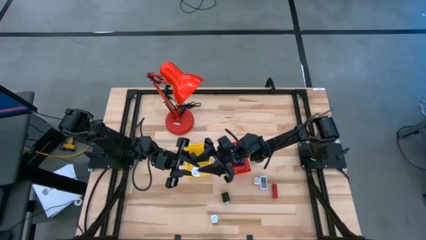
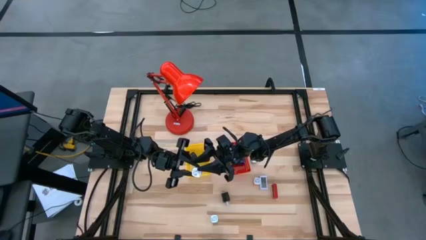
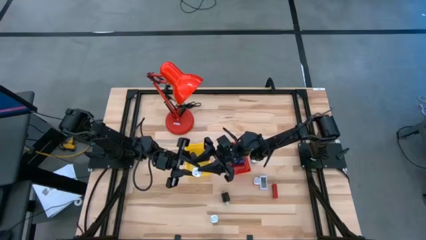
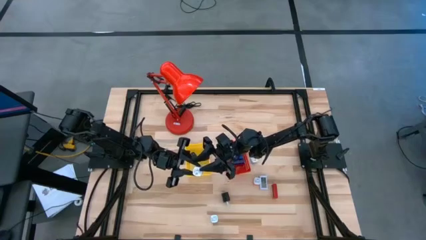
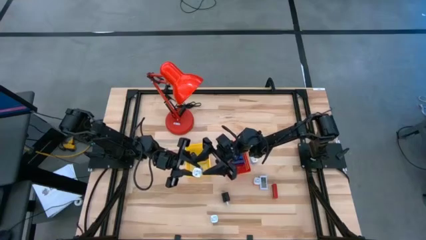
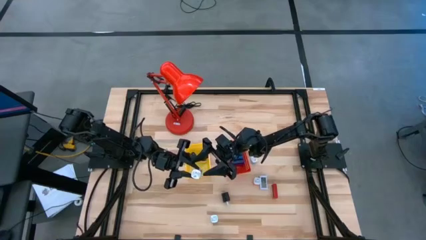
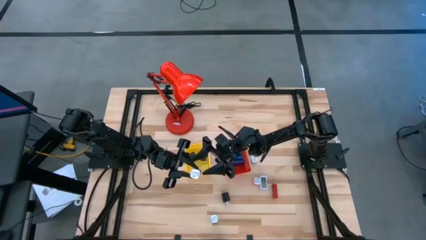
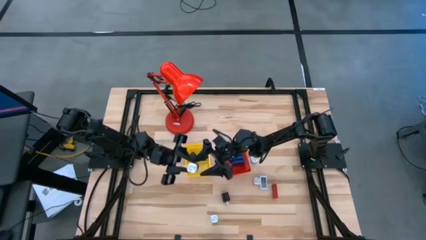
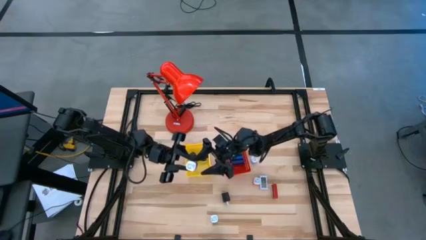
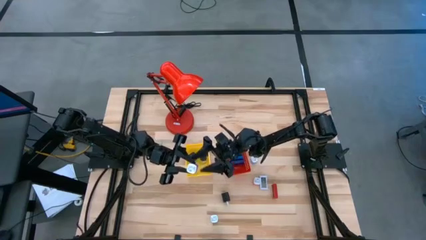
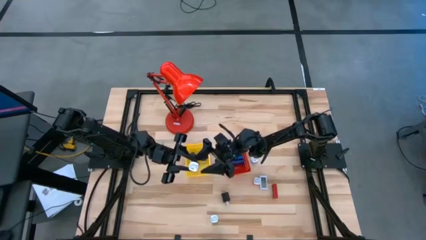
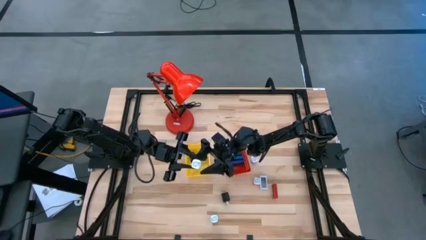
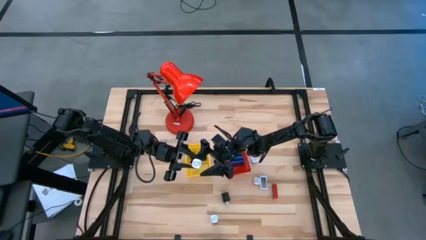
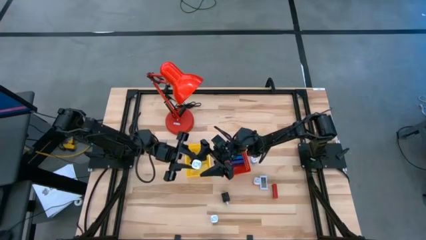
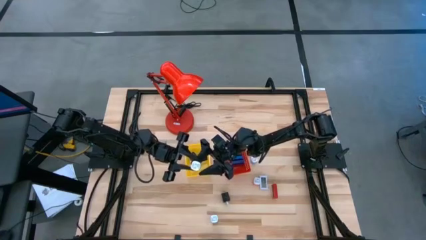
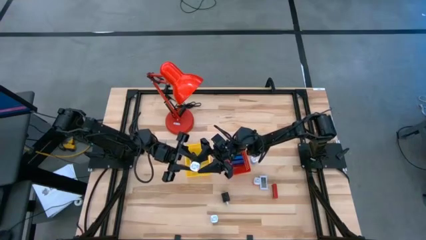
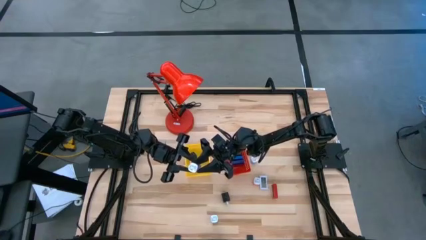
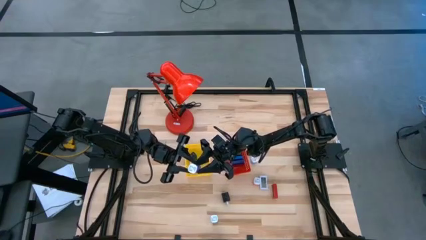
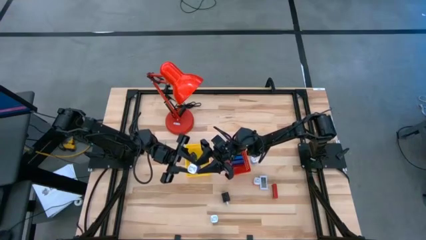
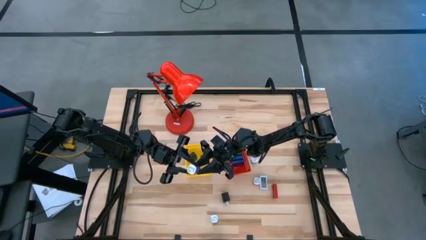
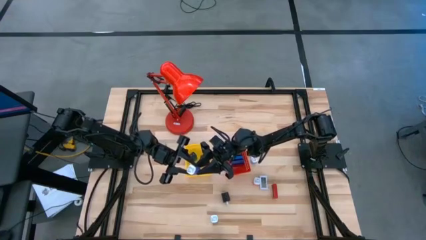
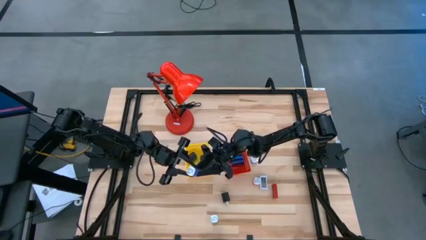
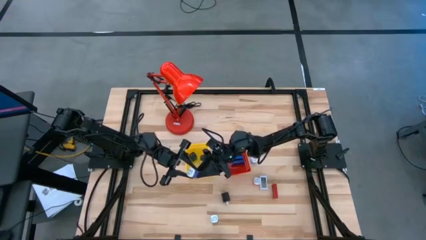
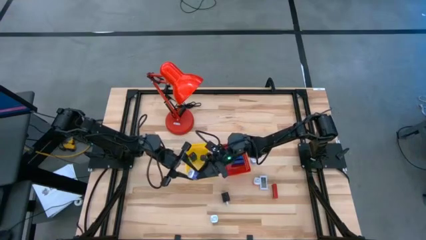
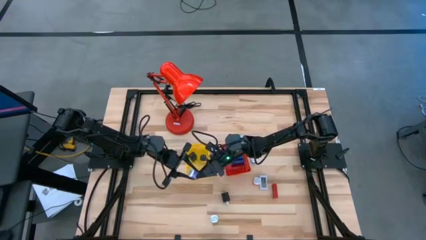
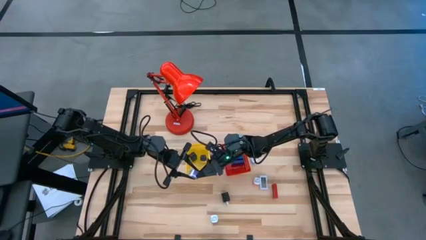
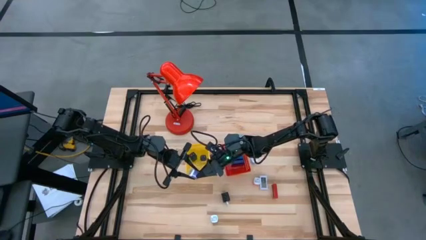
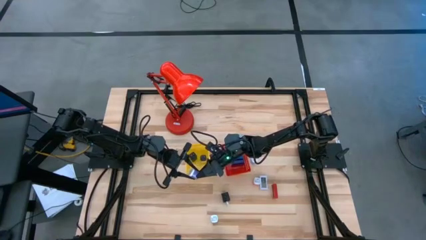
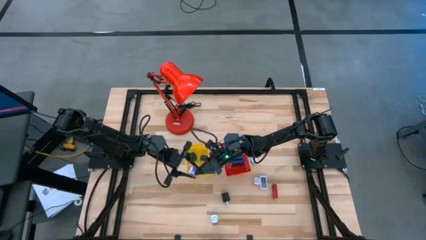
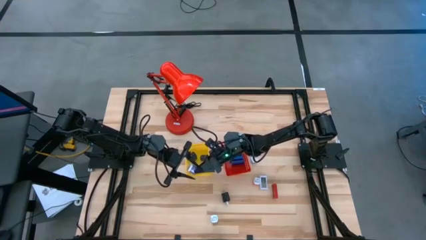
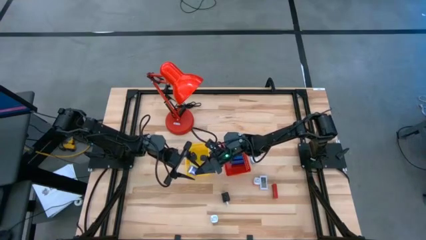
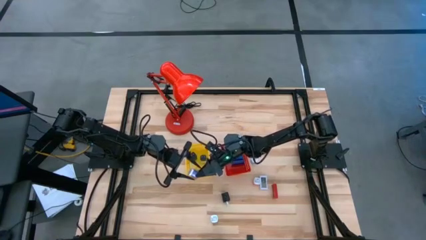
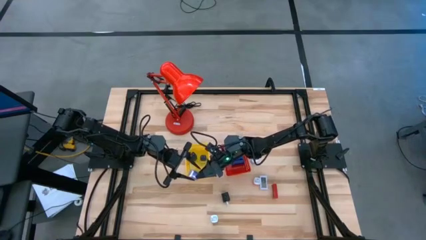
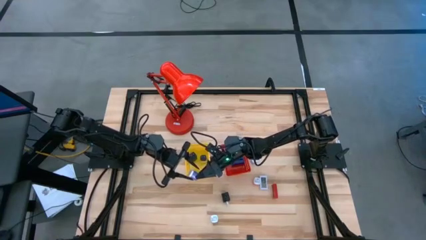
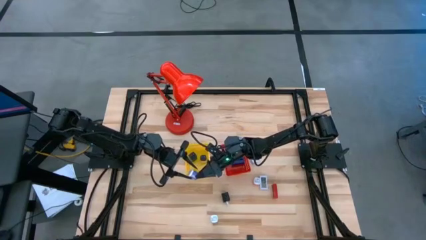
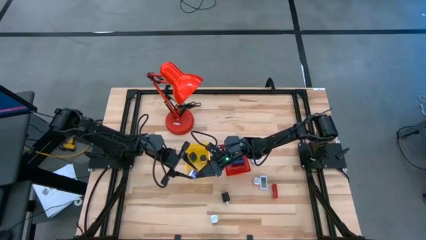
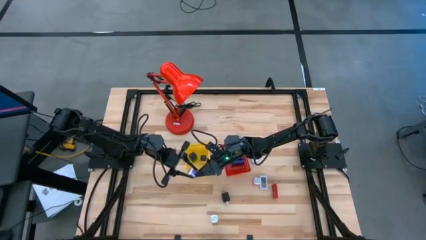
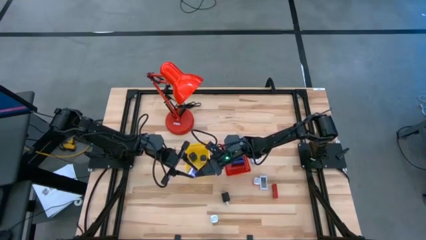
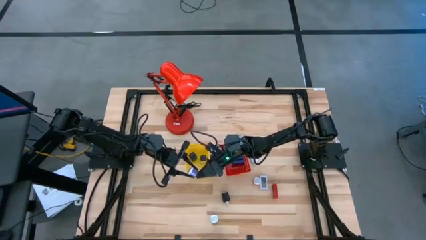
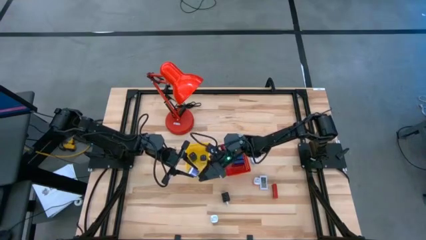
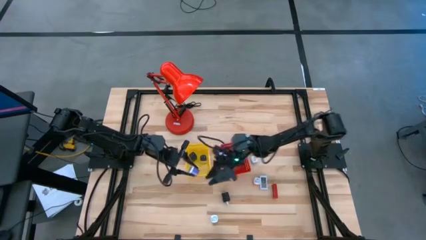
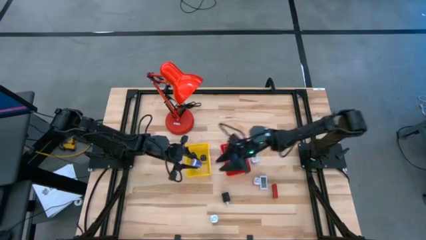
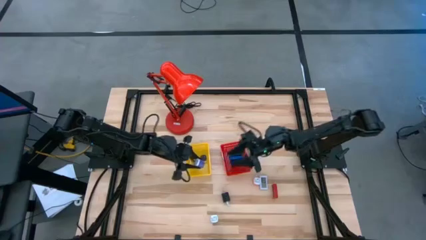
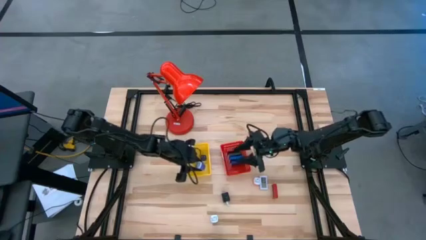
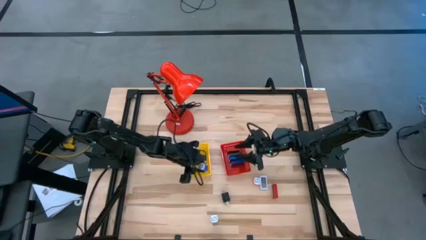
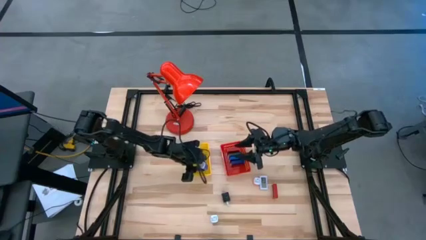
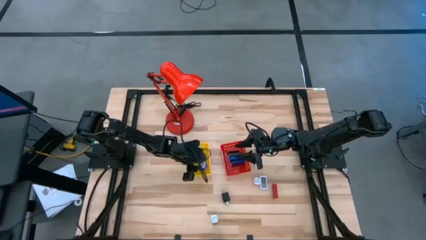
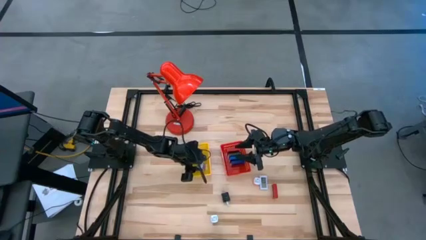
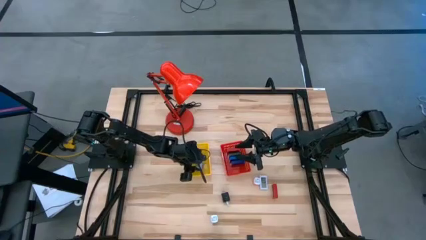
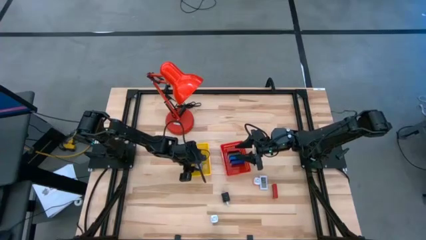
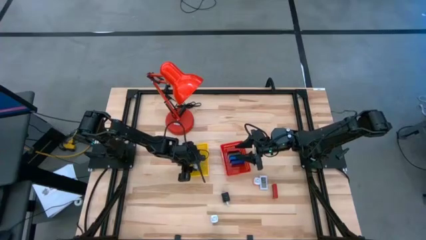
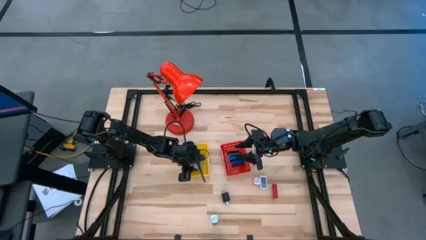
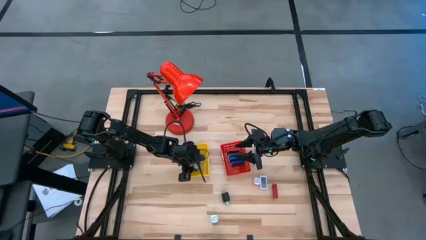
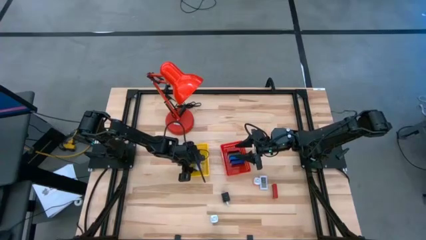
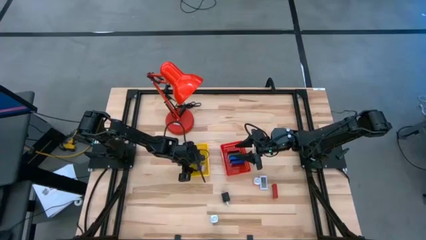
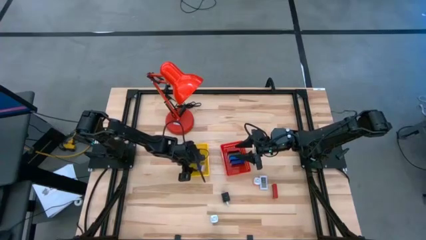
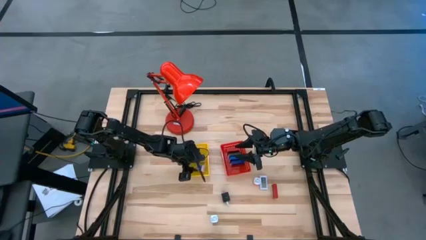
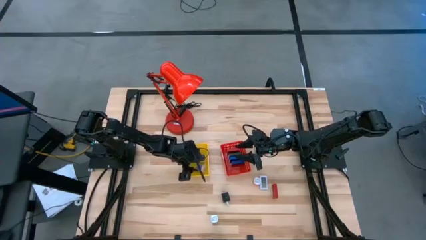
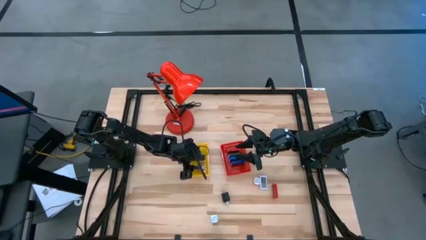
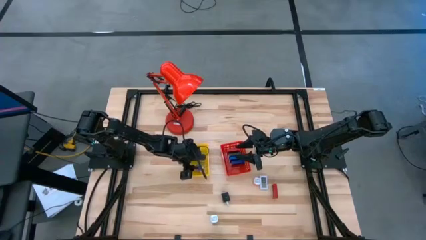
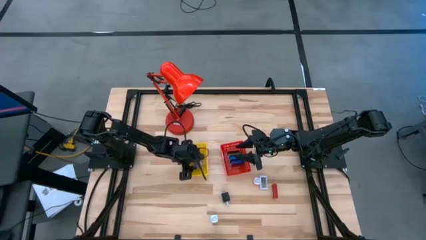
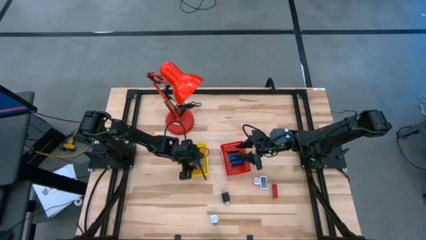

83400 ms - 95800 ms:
Task: Pick & Place Office items
Put the purple charger adapter into the yellow bin
